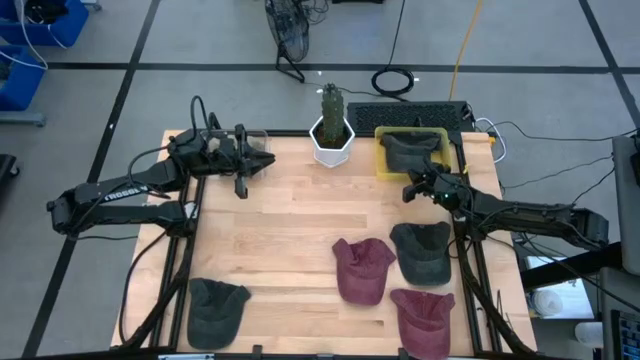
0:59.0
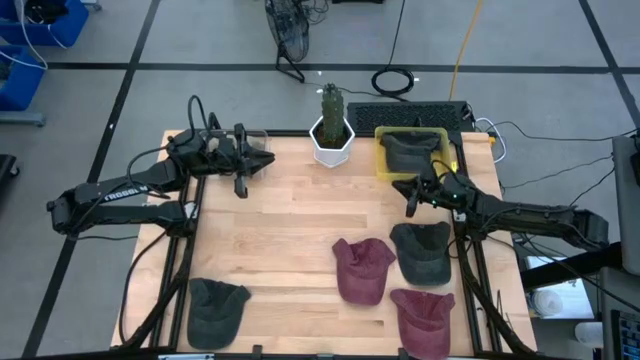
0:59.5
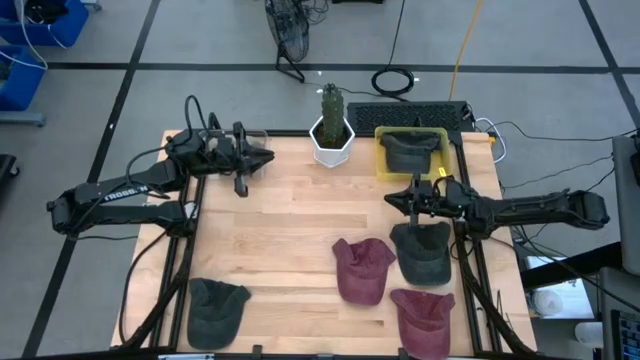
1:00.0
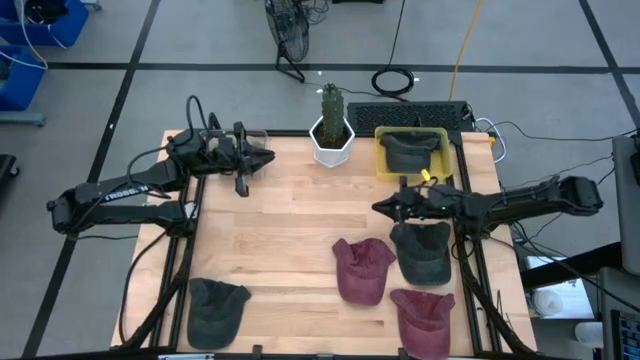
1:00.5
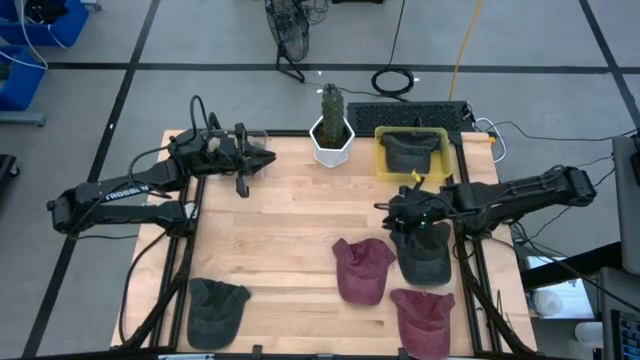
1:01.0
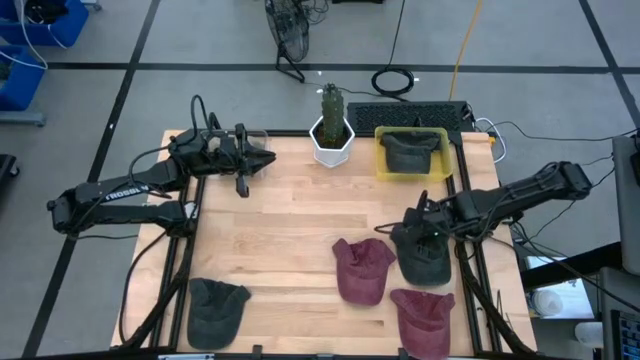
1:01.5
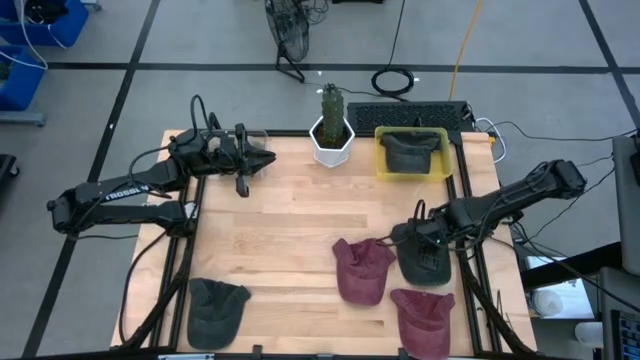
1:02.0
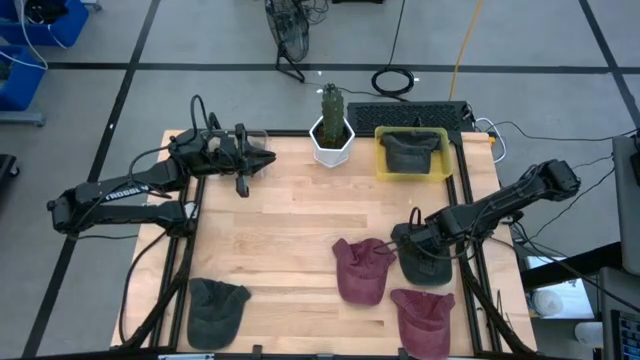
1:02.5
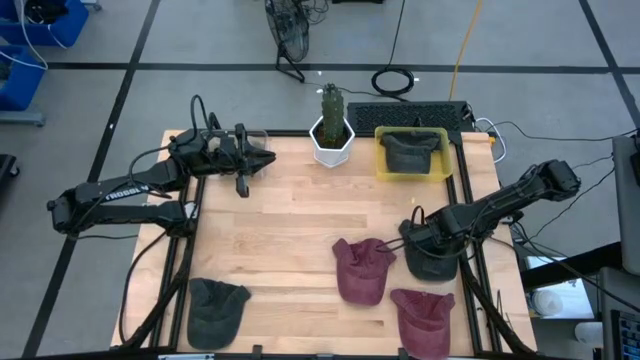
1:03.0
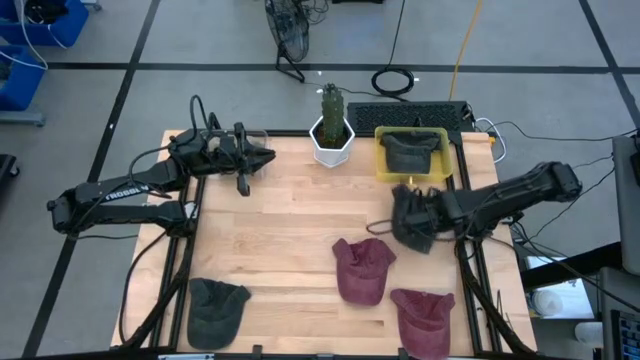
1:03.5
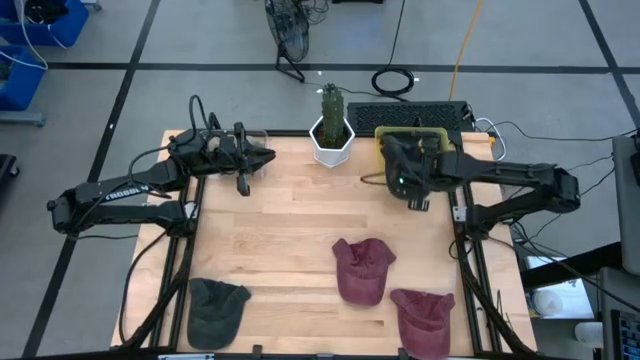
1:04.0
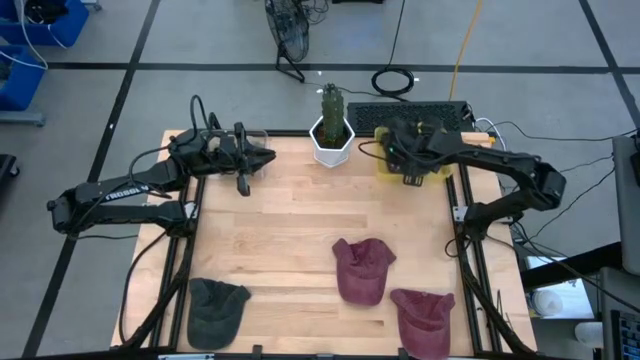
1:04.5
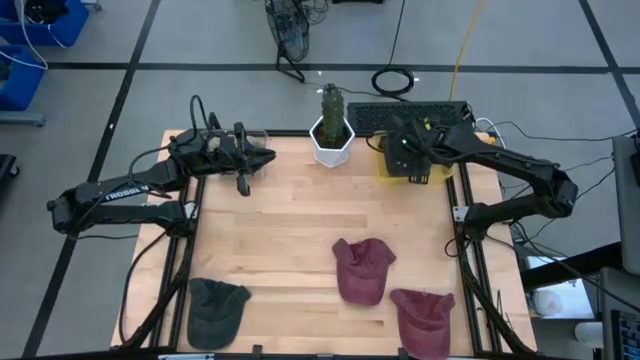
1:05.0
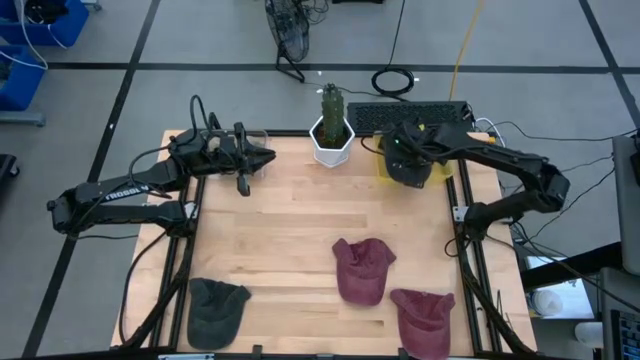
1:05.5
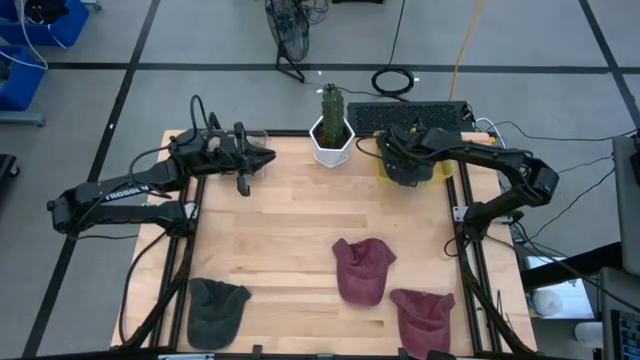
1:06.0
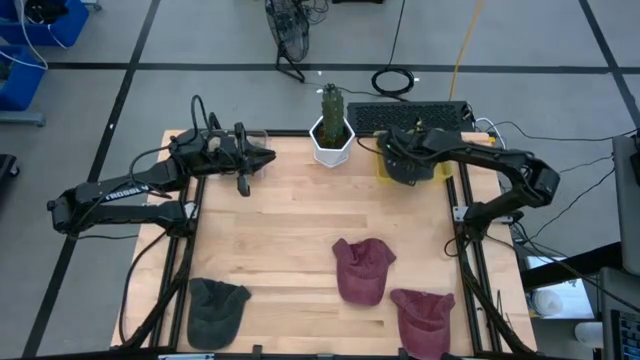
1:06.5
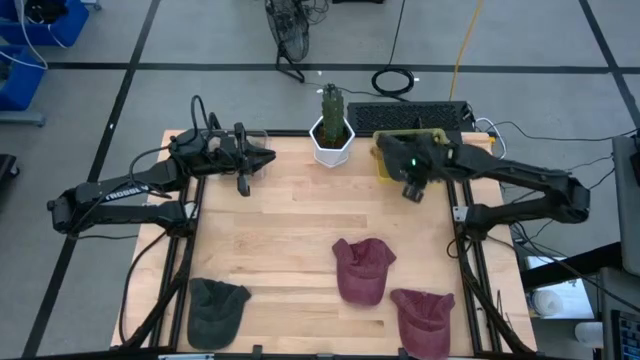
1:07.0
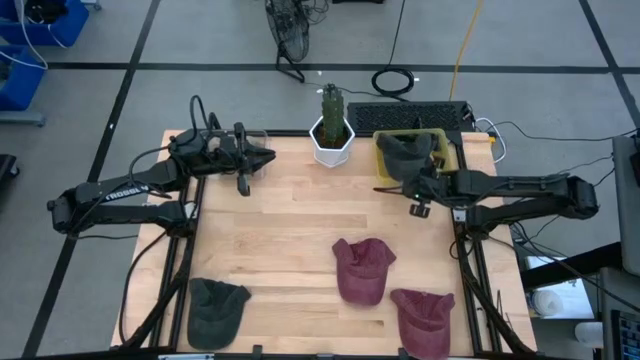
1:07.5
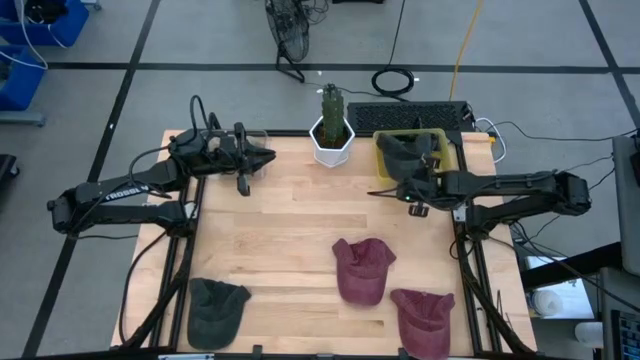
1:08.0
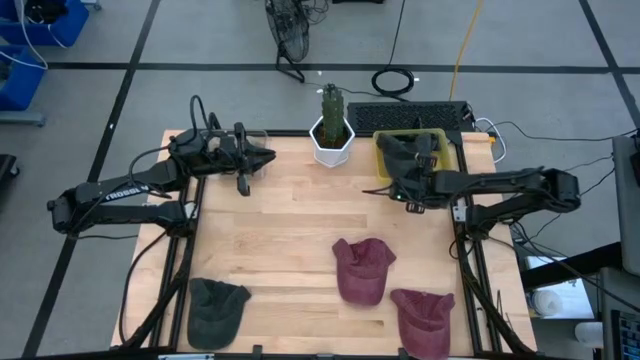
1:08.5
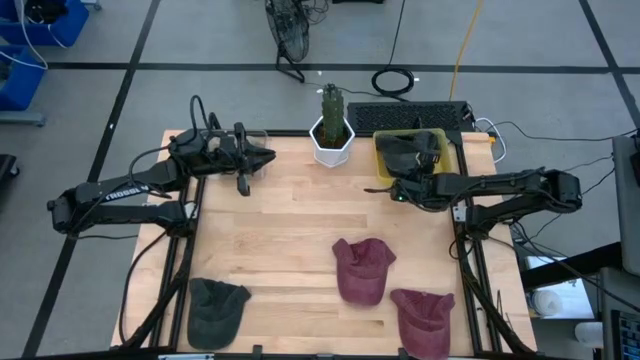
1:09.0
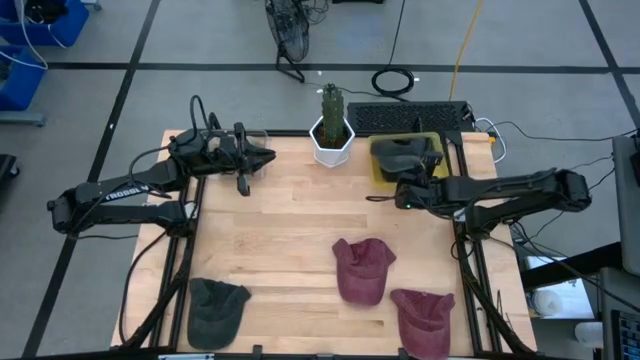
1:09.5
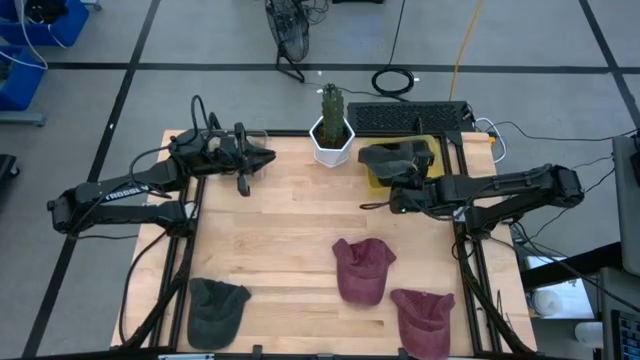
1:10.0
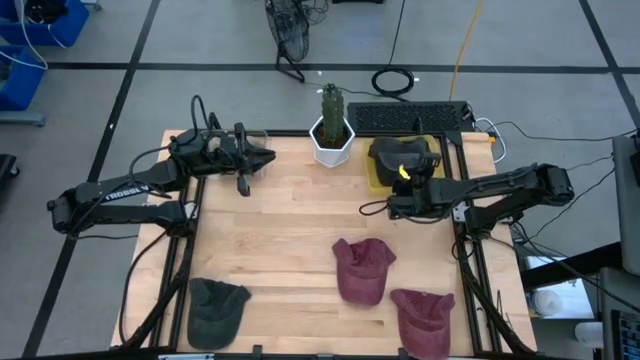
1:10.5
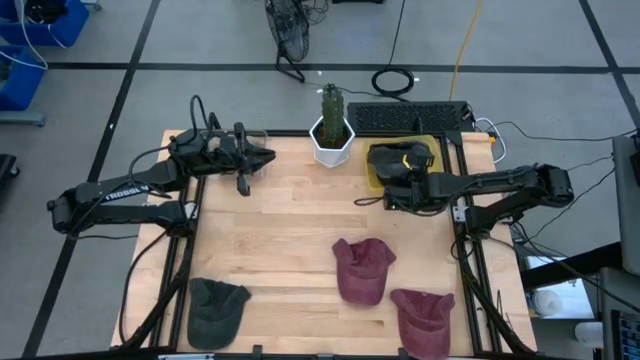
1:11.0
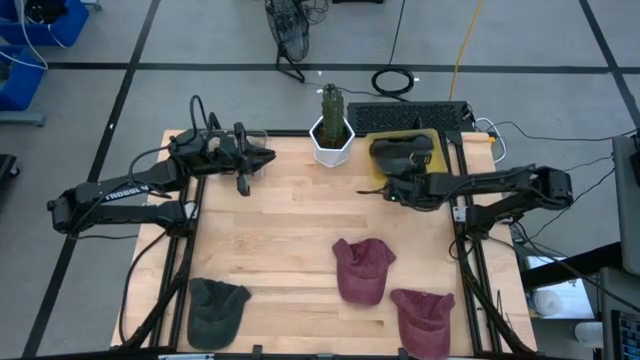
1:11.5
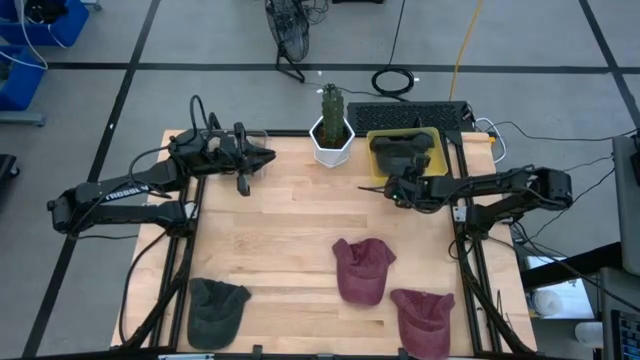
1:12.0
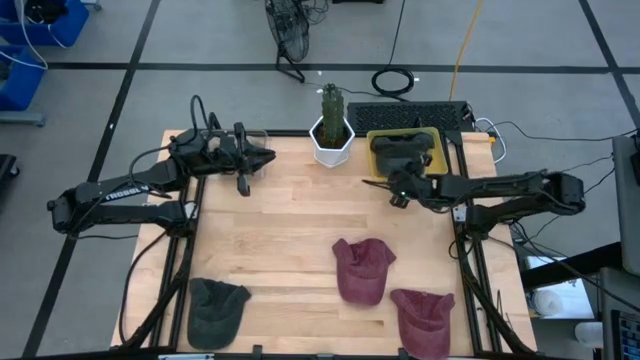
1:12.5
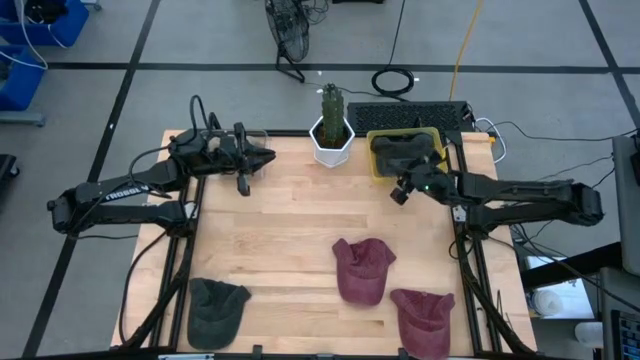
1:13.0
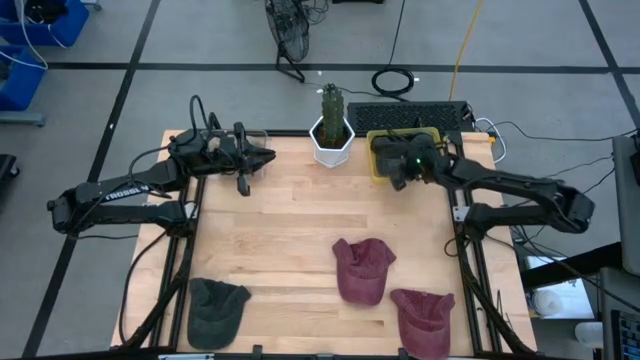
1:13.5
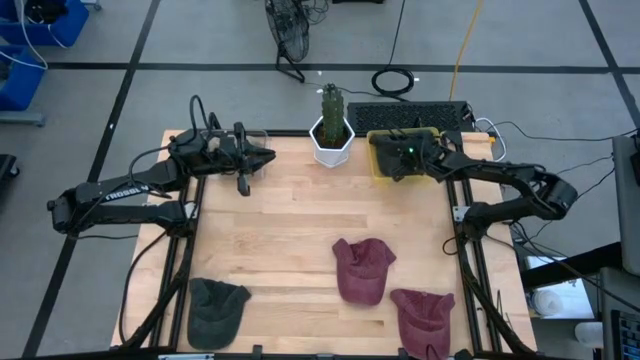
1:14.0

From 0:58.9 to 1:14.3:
Task: Pick & Place hat
Put the right black cap into the yellow bin

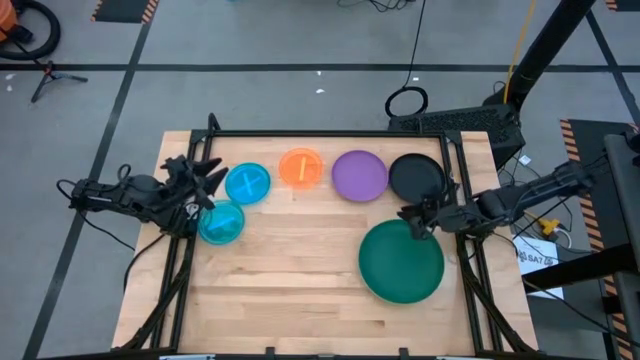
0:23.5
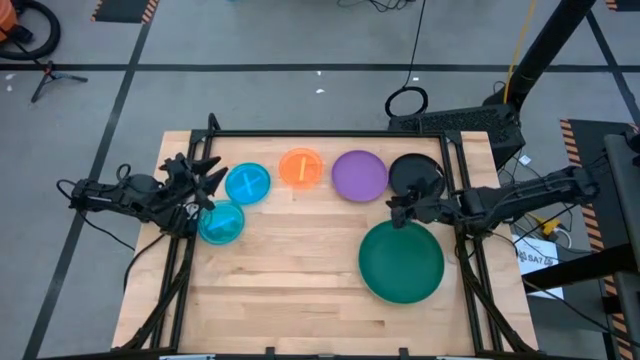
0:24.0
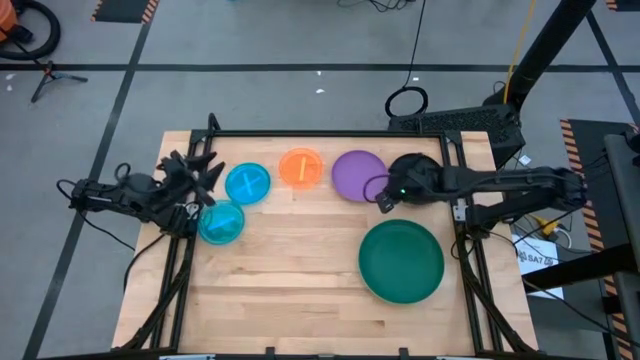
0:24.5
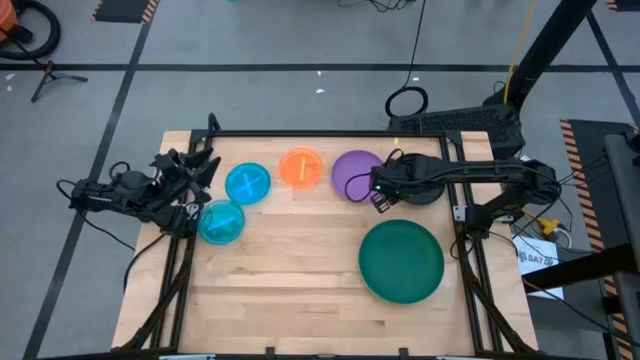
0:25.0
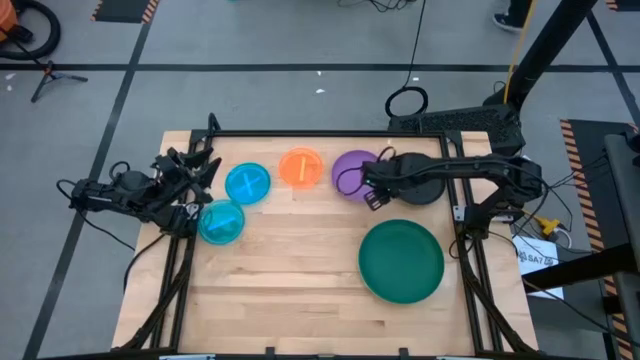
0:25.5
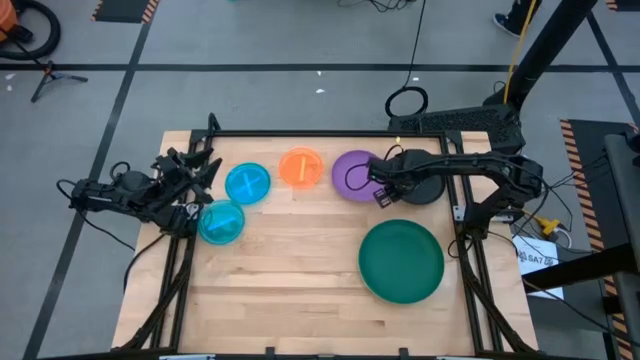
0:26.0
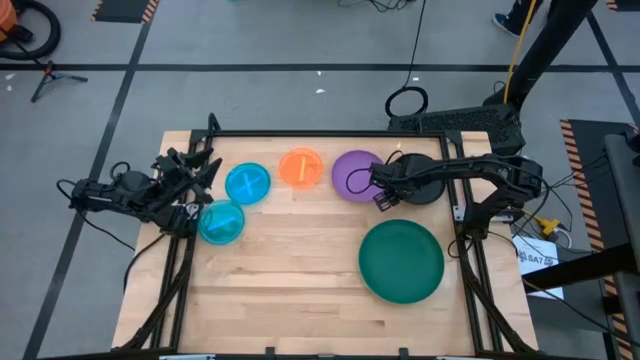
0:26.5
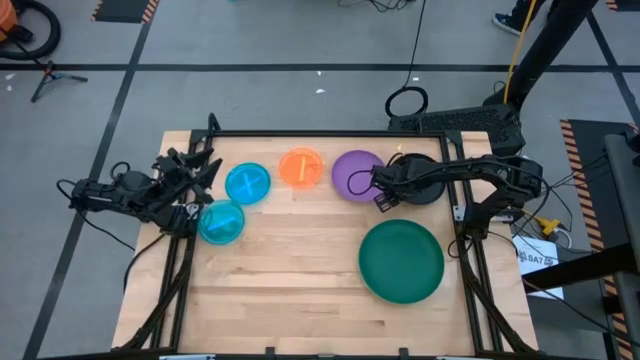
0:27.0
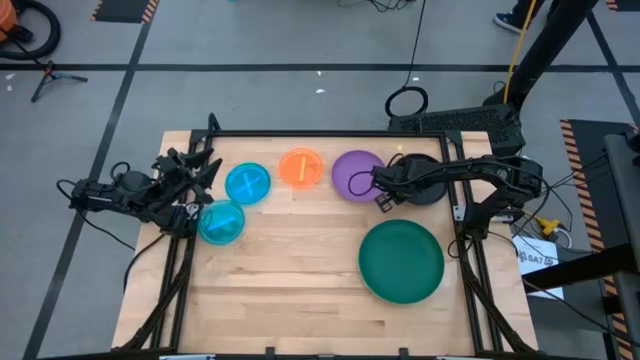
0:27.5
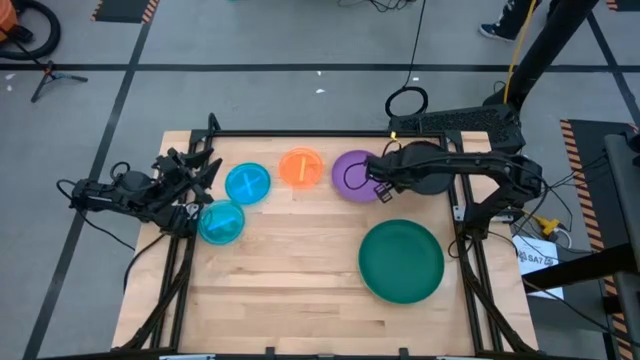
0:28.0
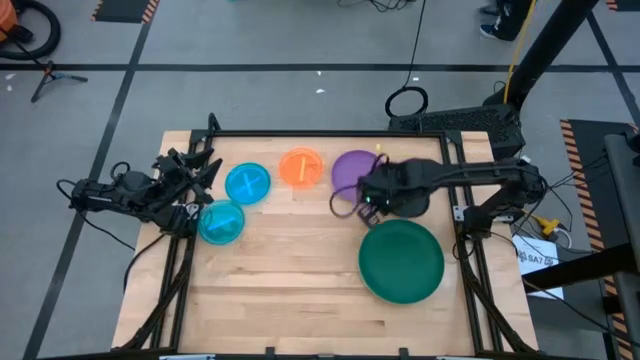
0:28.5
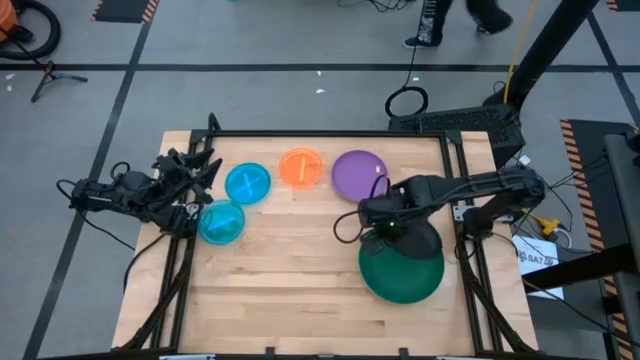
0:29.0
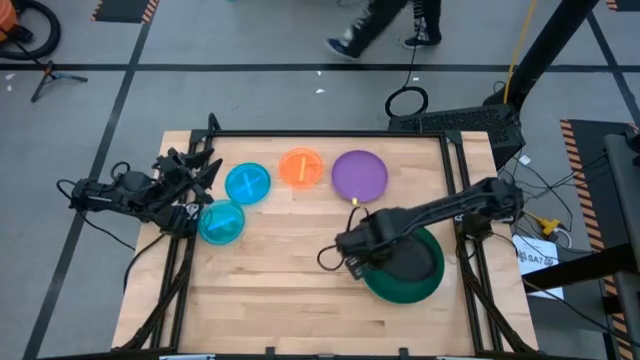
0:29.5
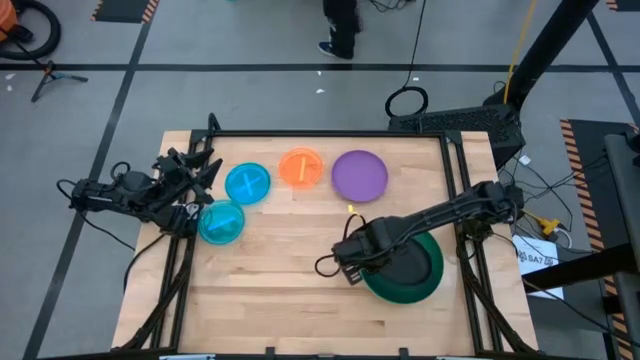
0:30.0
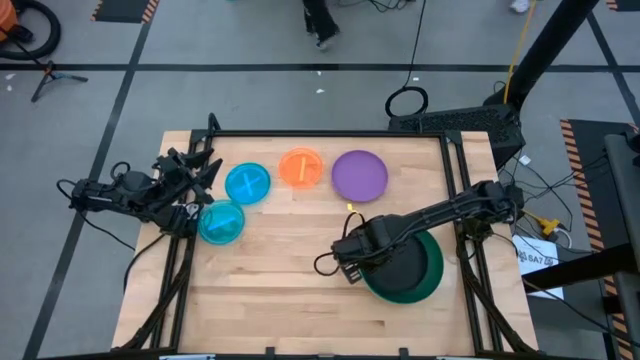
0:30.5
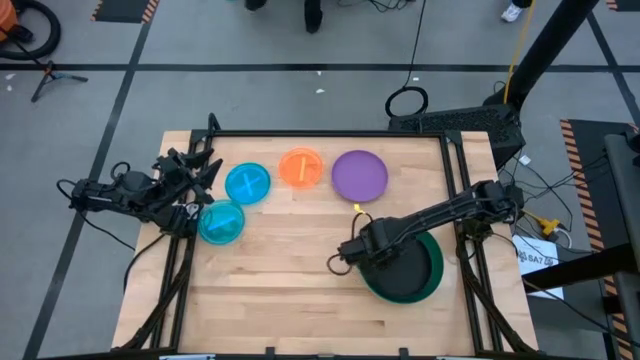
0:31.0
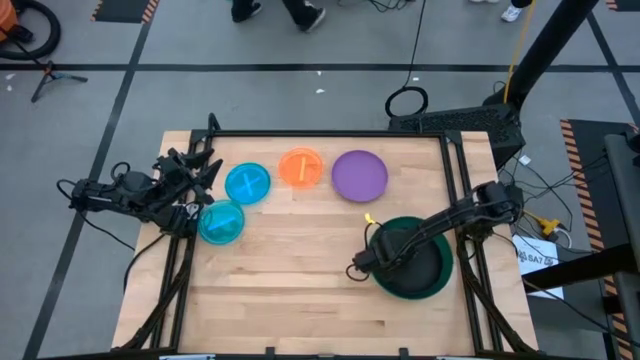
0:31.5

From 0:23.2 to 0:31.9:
Task: Stack plastic plates
Stack the black plate on top of the dark green plate
